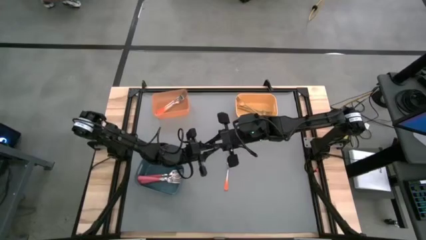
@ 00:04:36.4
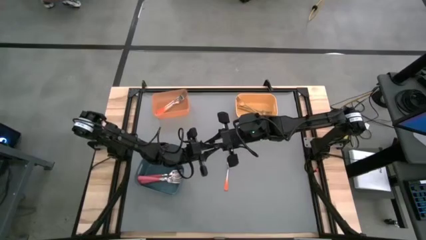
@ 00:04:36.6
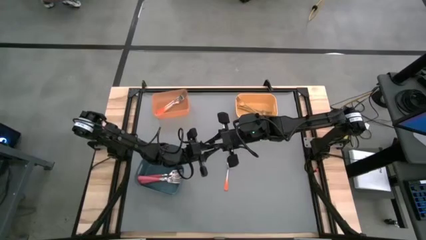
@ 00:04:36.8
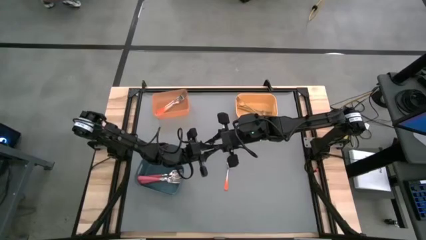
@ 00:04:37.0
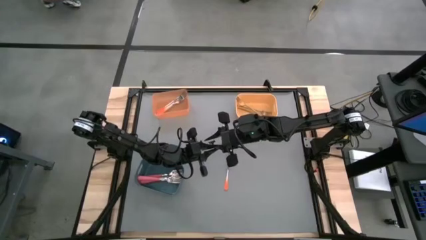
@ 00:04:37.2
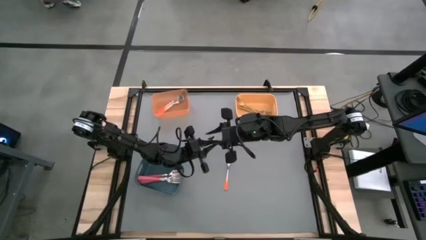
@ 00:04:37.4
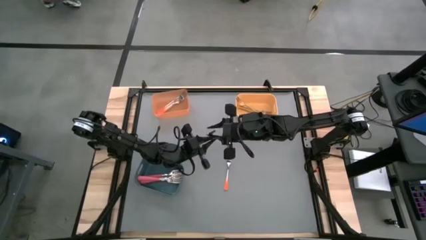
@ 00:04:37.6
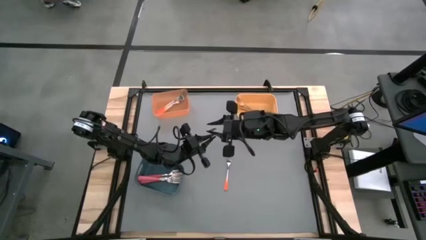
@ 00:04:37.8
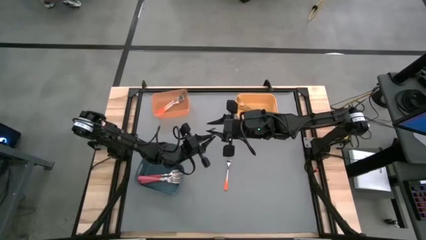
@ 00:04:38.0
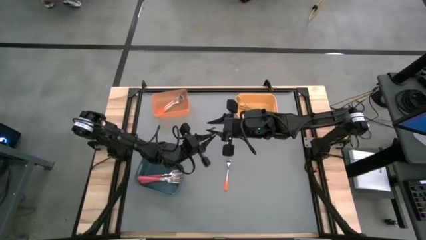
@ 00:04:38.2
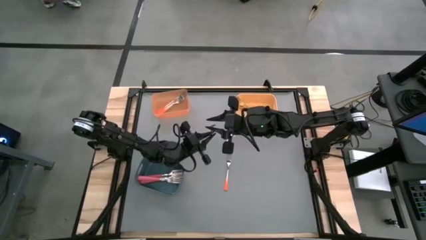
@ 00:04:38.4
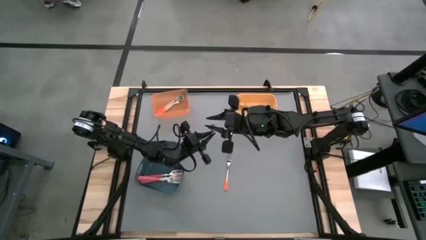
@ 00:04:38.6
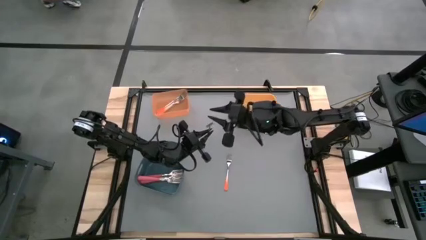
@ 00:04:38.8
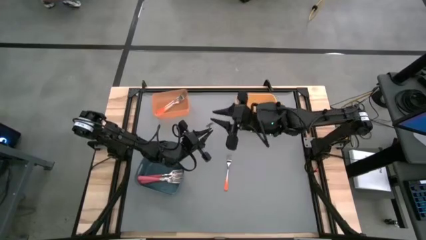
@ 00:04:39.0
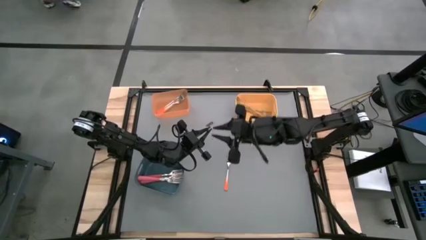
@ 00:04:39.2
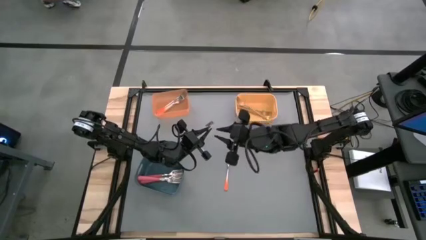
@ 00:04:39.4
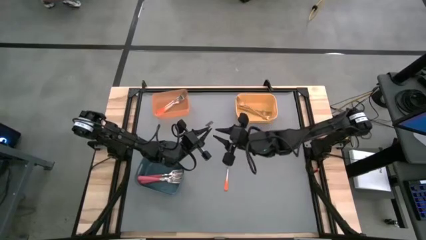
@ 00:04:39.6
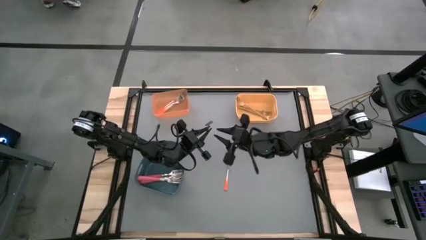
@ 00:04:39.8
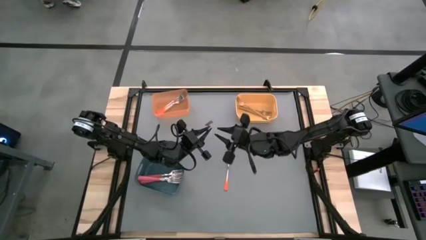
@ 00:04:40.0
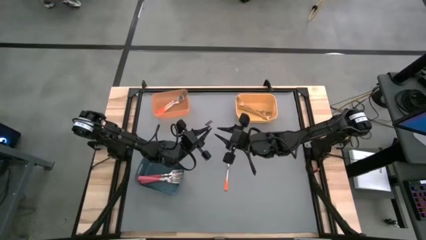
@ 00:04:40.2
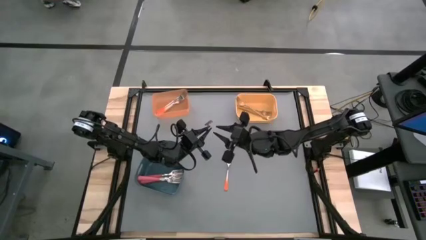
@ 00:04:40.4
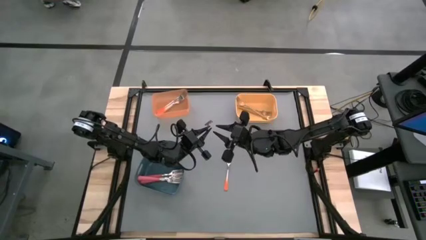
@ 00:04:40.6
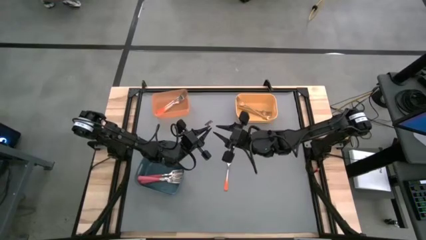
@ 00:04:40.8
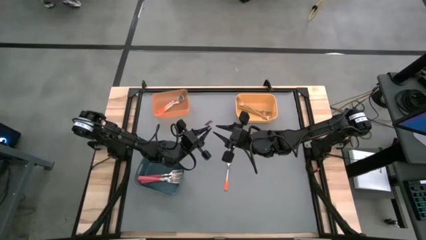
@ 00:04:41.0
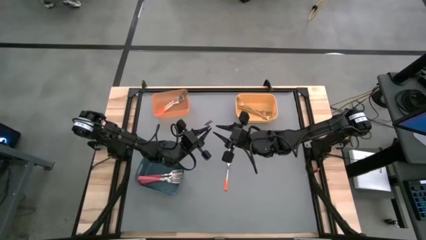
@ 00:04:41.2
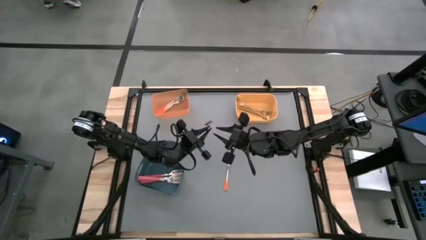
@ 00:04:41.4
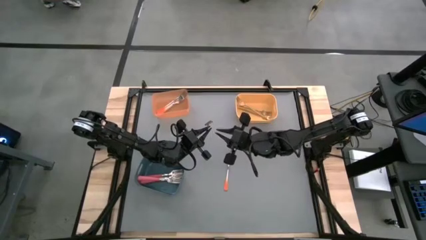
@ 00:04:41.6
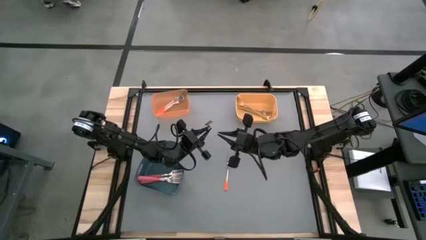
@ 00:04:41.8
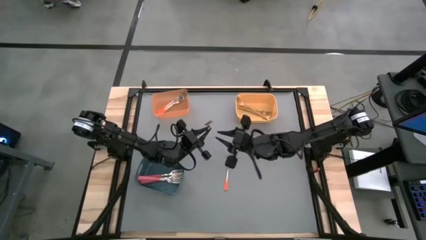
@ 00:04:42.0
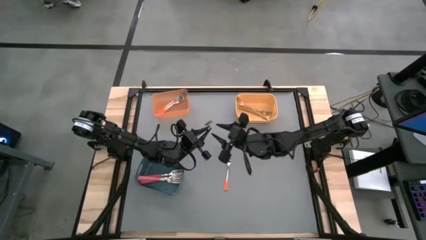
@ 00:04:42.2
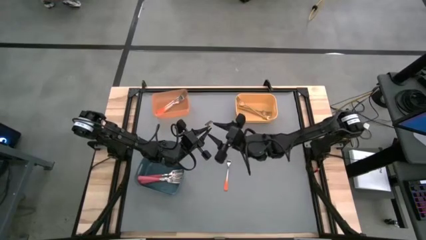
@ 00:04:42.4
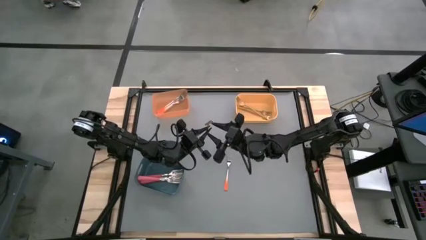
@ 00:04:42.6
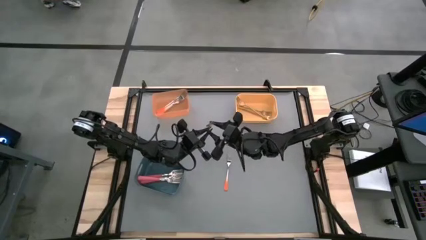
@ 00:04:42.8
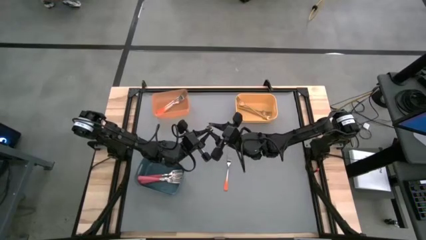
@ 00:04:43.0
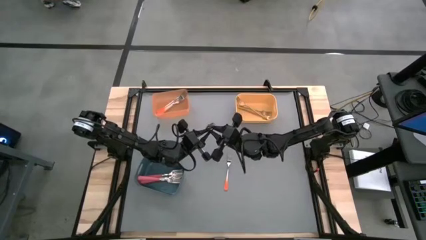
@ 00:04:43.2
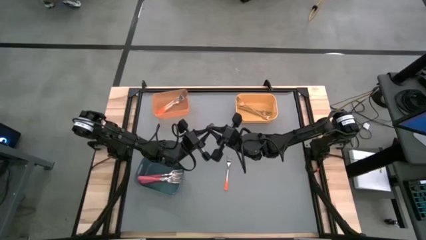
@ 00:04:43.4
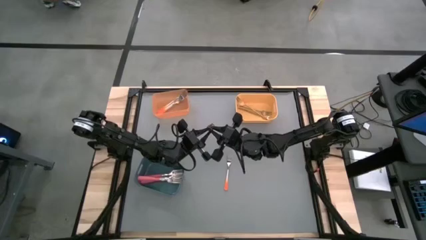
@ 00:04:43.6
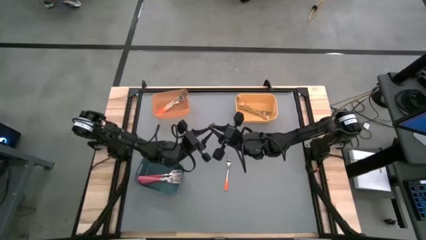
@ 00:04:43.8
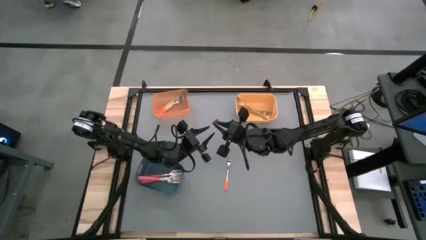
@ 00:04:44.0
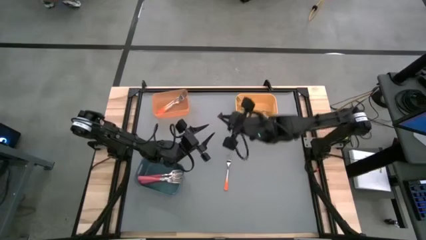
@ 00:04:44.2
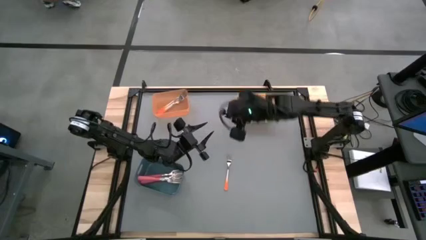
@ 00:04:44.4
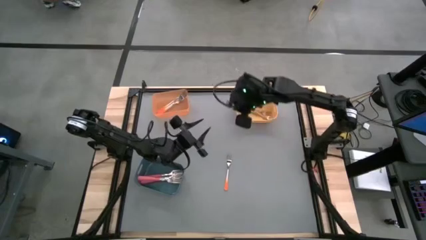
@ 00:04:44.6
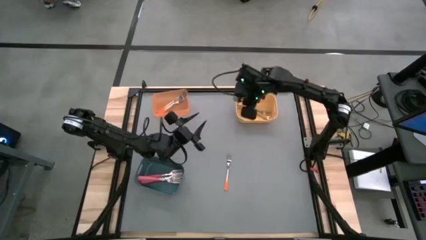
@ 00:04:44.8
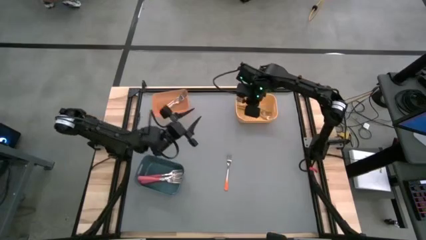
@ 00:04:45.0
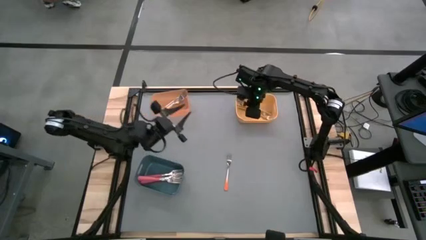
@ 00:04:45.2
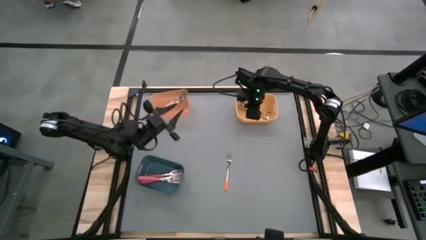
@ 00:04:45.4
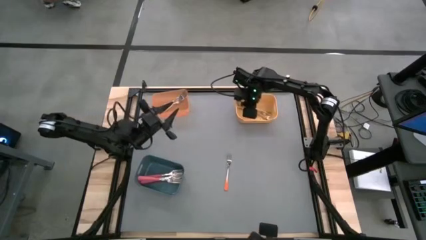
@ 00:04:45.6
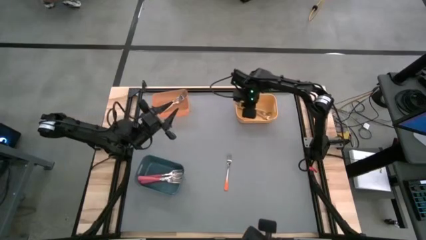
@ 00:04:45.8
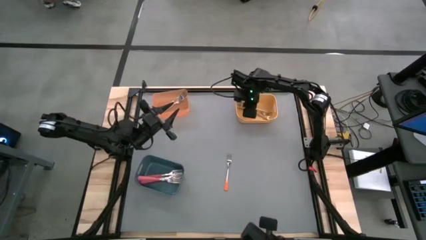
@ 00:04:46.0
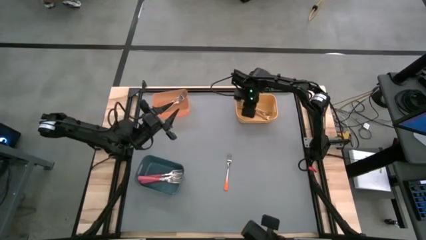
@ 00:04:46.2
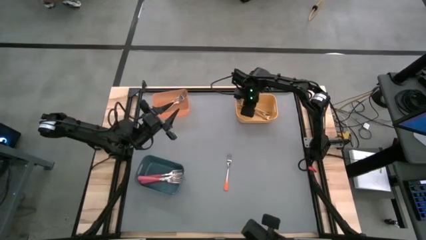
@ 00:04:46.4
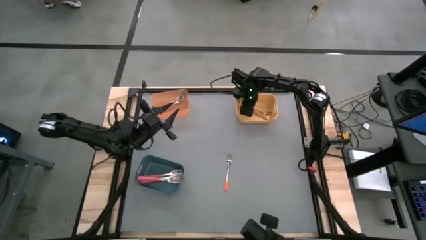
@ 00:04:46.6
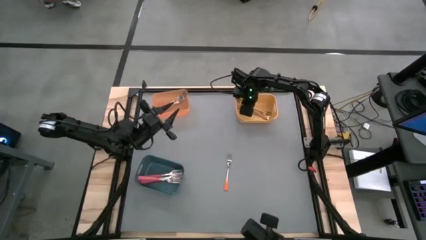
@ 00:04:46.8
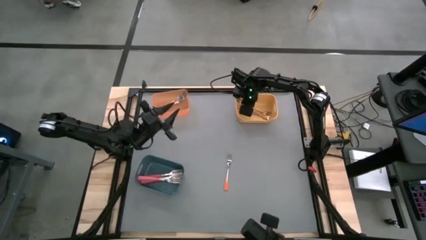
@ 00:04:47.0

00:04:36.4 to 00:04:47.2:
Task: Sort silverware by color (type)
Put the gold fork into the yellow bin
